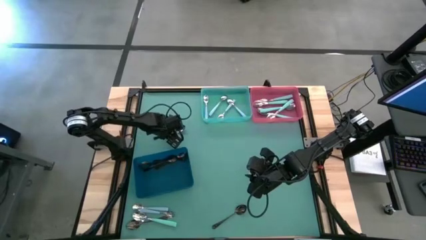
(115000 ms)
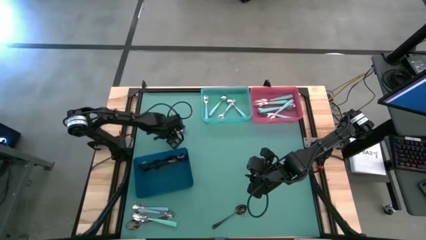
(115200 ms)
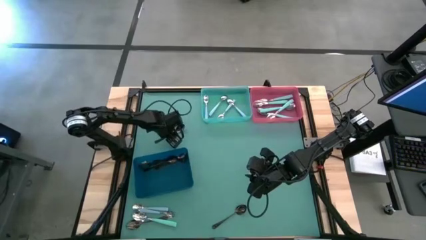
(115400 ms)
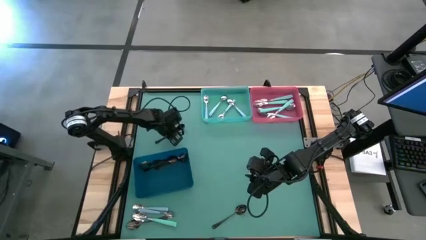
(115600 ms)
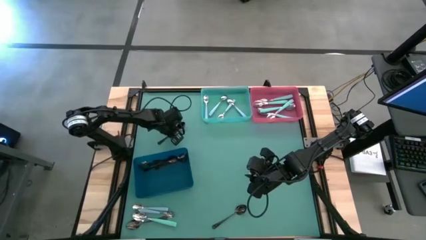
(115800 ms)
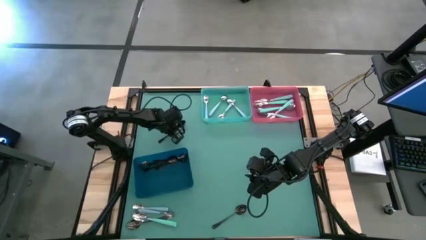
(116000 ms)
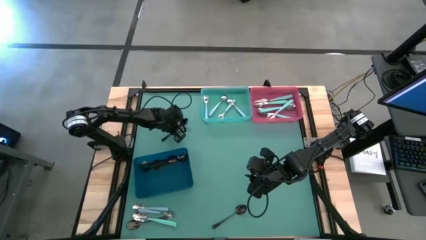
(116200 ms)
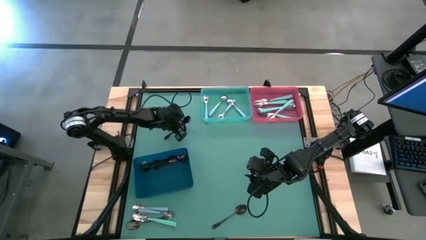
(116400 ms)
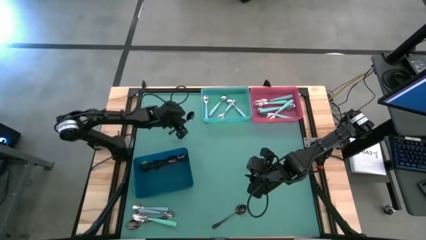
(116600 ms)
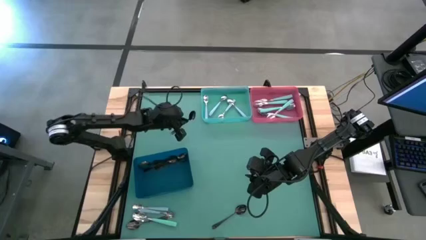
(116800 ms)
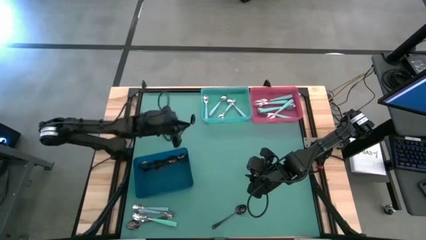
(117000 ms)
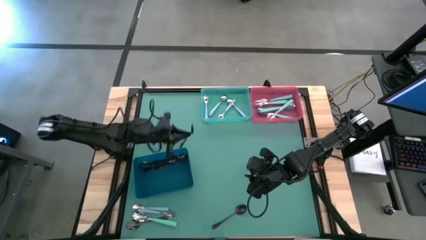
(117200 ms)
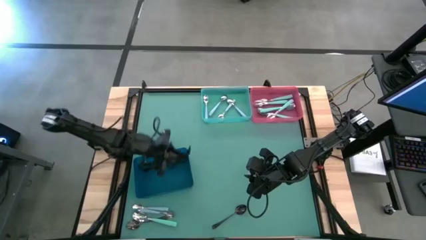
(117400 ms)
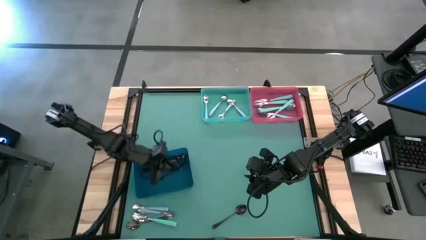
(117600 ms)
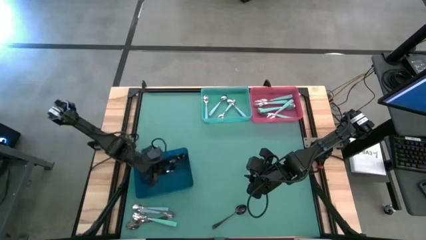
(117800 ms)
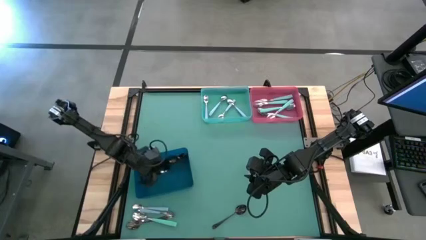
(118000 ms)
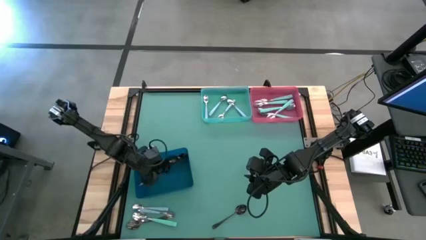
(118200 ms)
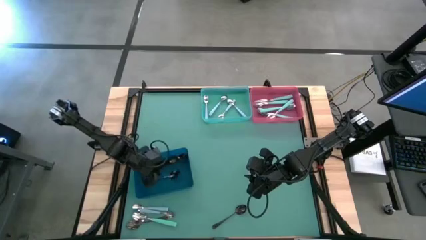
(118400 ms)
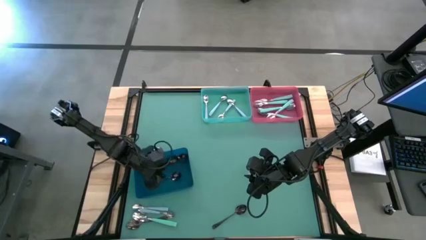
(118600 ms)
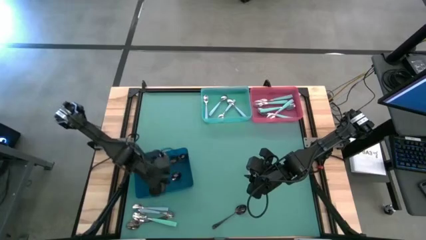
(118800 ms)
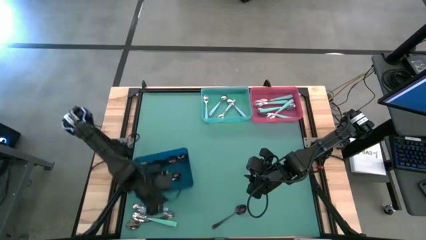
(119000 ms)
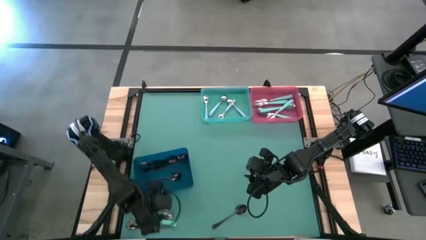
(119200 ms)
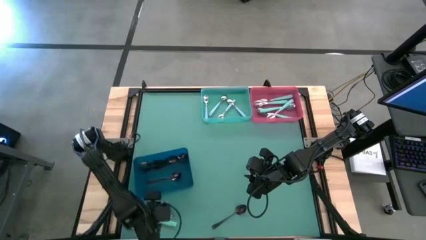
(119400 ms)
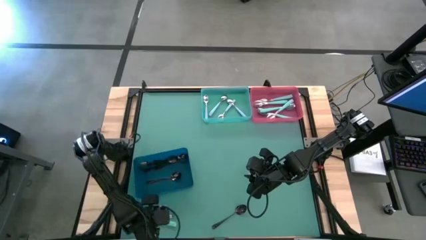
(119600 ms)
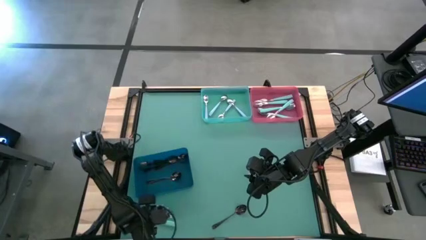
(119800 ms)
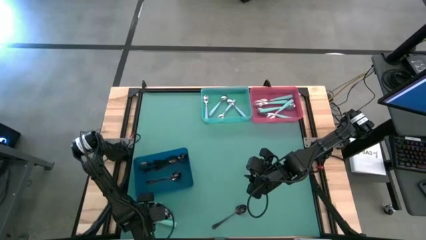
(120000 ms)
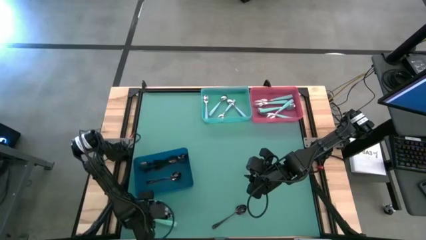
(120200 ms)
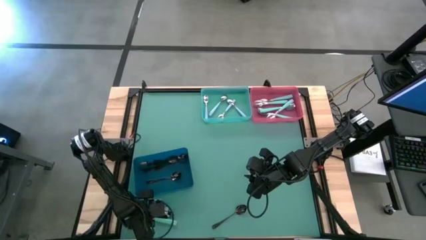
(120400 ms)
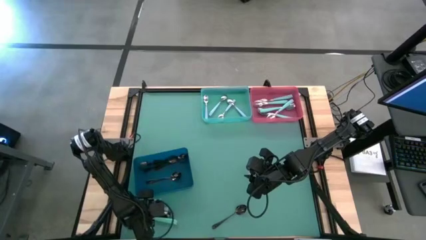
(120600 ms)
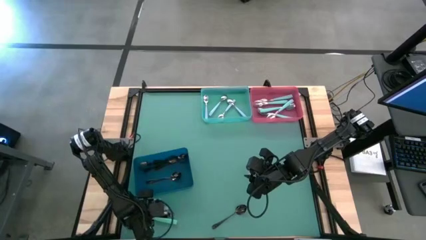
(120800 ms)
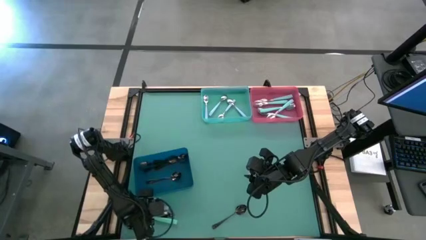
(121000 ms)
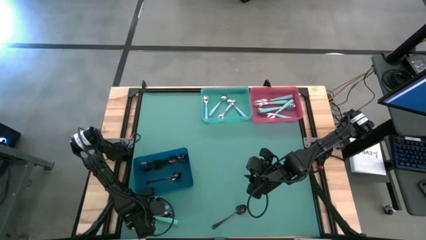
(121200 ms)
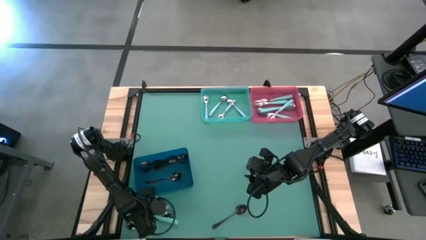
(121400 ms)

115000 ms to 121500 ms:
Task: Sort silverware by color (type)
Put the top black spoon into the dark blue bin

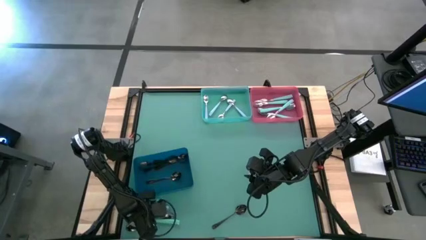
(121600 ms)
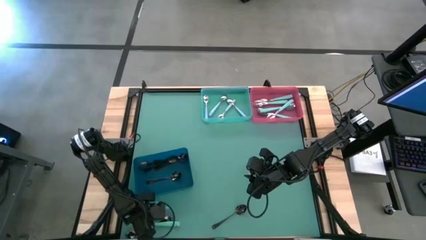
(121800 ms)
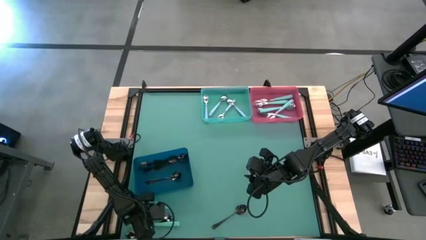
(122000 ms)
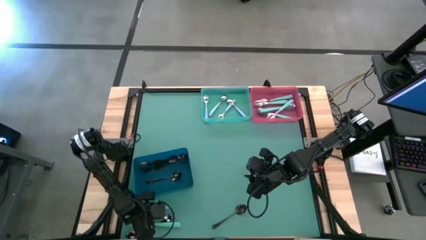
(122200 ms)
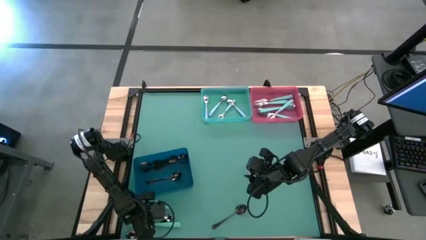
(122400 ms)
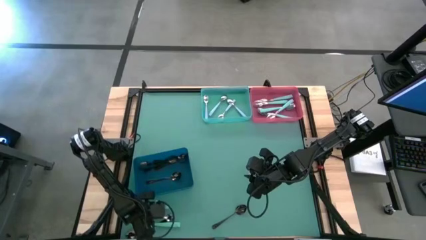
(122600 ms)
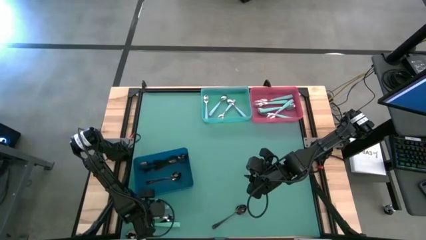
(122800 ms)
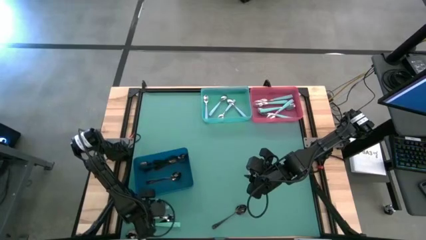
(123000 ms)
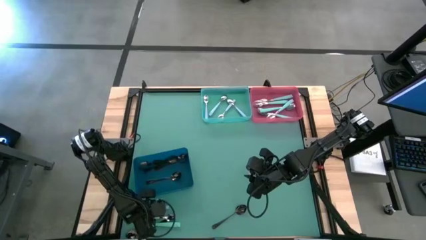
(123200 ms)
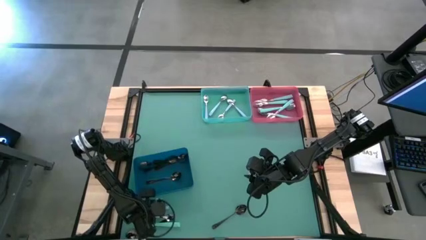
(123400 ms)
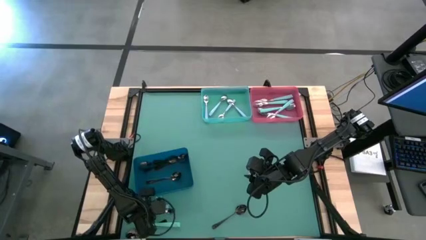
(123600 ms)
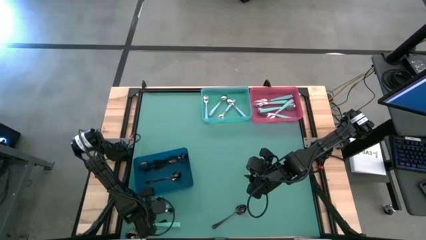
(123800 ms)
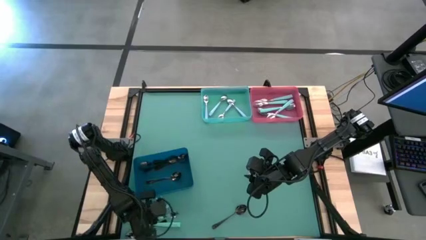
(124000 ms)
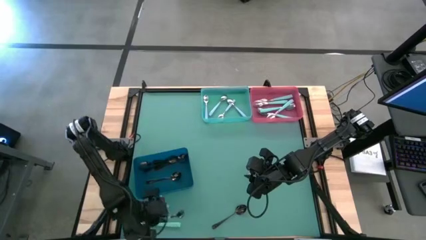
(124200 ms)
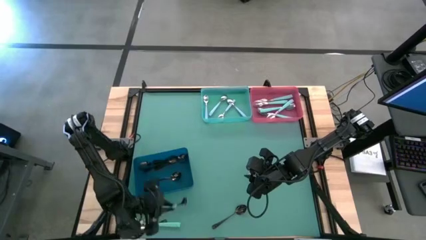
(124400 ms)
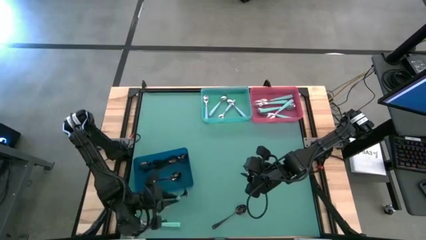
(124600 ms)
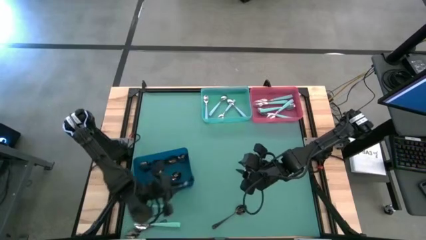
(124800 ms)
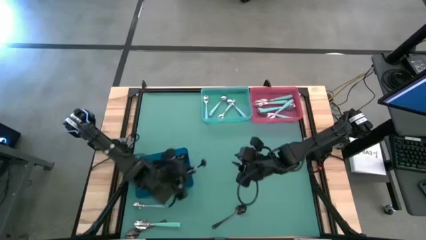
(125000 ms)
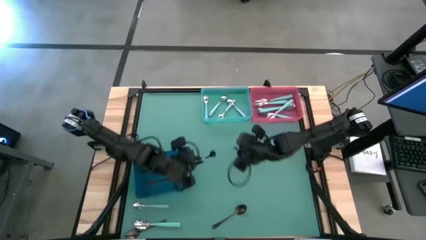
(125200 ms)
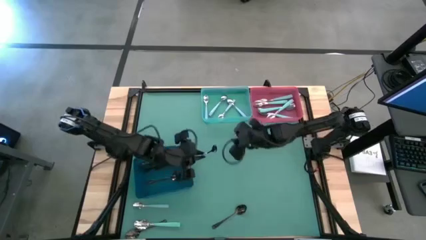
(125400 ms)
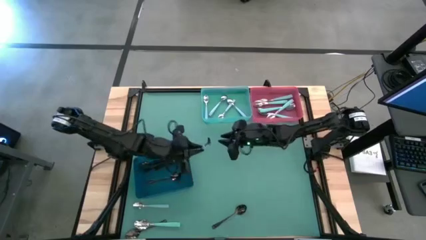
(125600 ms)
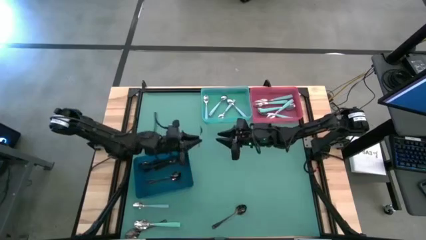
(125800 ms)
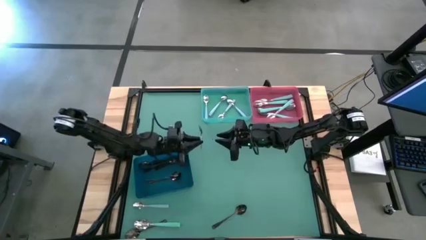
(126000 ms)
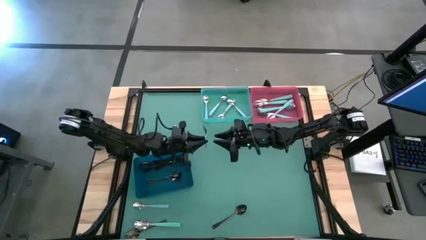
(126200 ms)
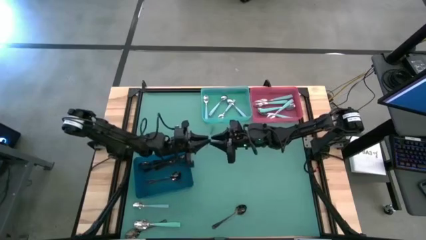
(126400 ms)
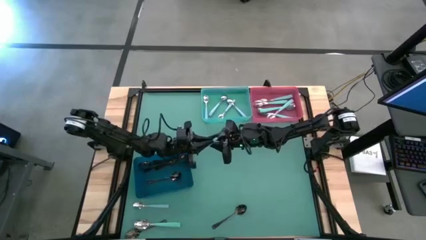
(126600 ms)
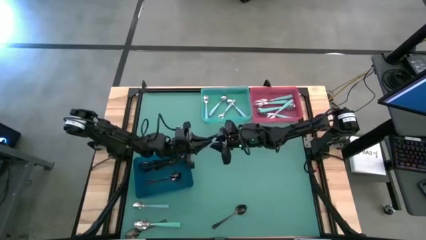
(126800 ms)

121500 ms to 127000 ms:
Put the bottom blue spoon into the light blue bin

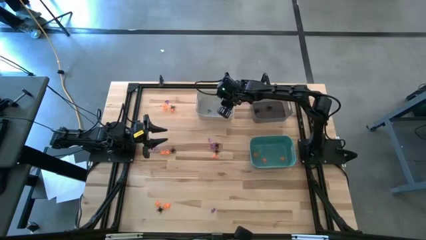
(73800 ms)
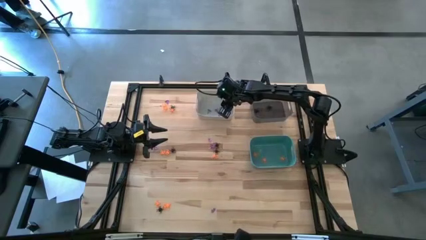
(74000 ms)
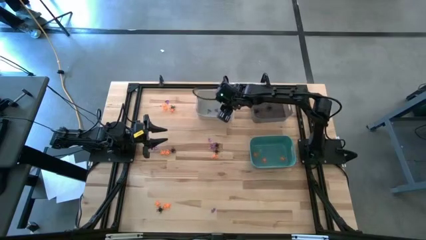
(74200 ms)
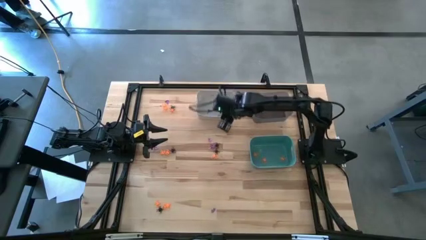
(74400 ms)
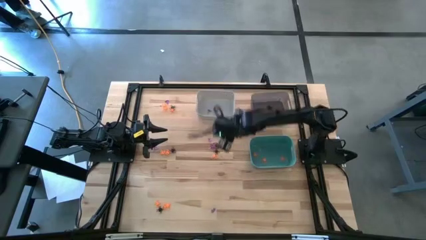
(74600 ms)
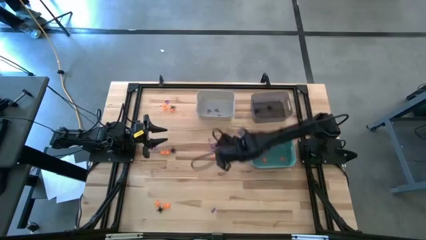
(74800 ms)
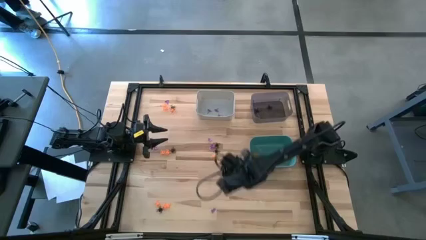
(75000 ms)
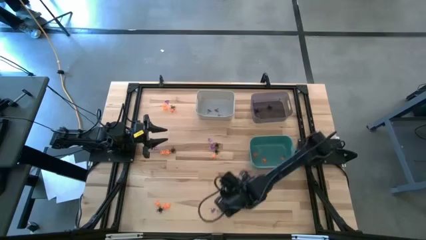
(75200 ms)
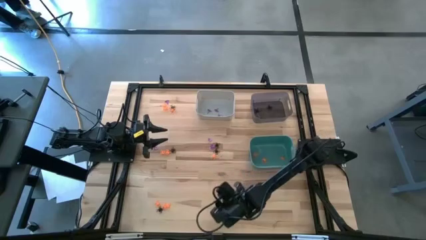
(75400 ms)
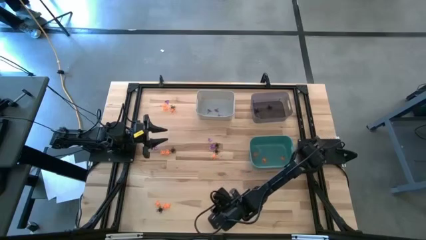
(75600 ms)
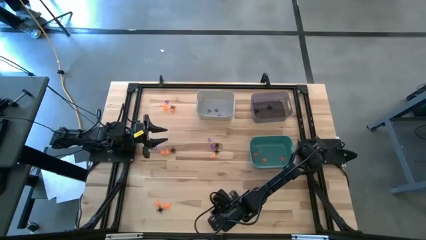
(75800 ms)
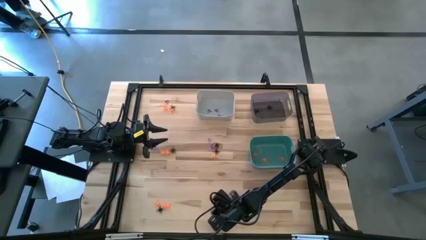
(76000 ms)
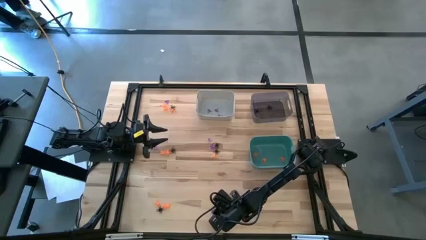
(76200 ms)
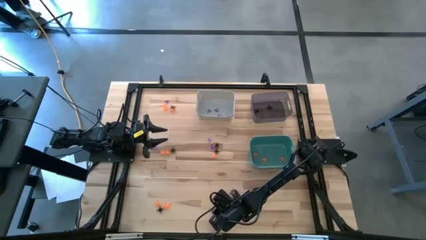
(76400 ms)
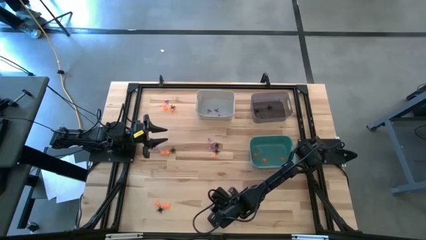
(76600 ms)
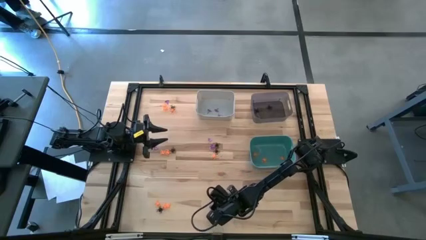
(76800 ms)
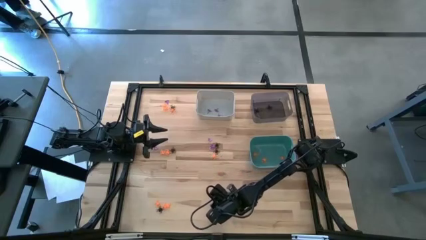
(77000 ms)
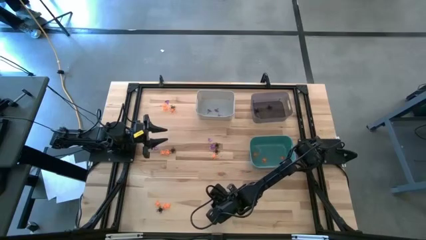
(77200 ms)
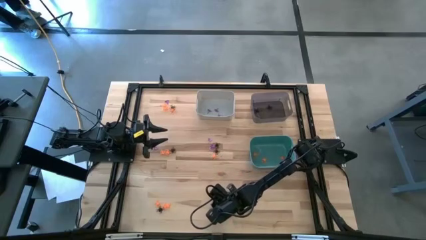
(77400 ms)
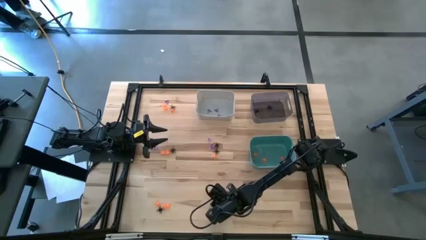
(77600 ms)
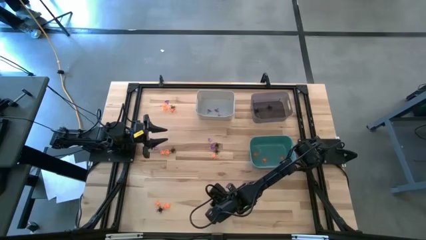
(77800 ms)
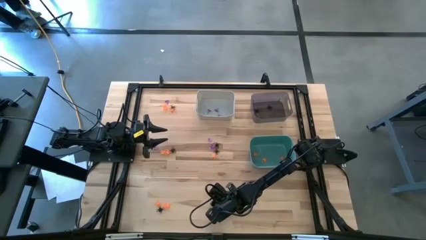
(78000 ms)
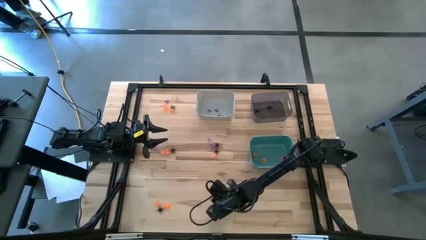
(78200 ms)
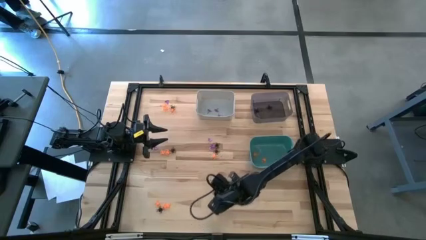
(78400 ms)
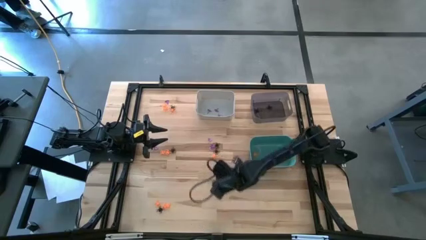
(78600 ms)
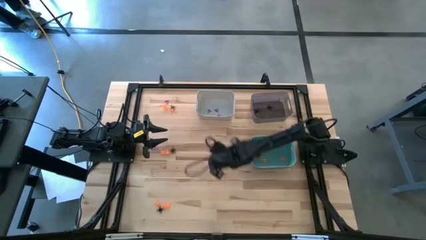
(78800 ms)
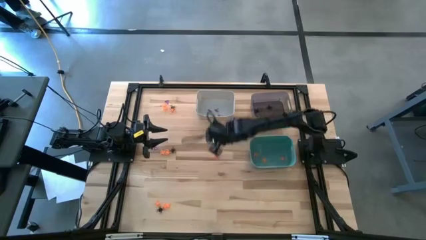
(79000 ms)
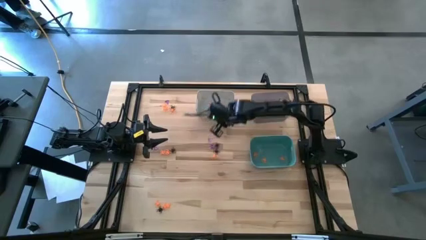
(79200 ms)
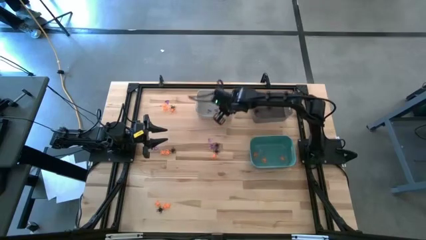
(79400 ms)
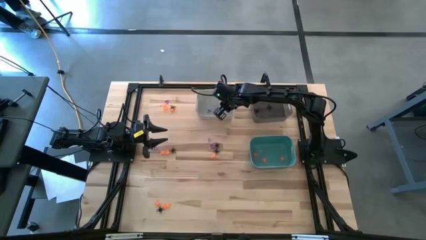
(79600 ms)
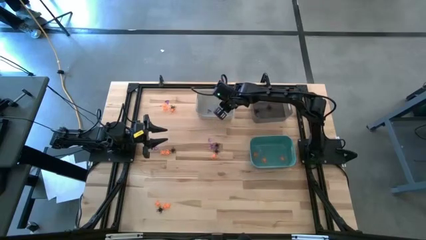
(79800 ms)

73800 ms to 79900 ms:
Task: Sort Halloween decoration
Put the purple witch hat toy into the white bin
